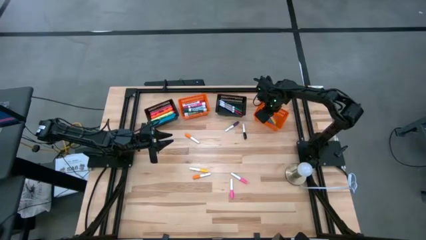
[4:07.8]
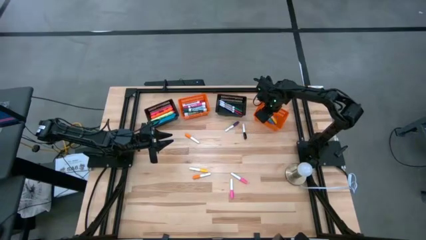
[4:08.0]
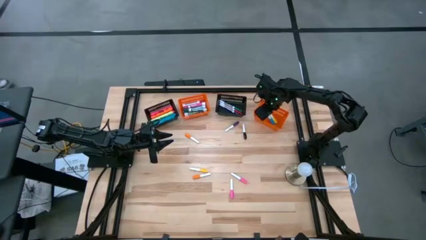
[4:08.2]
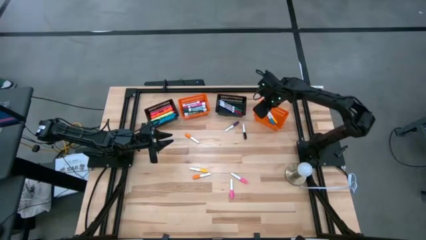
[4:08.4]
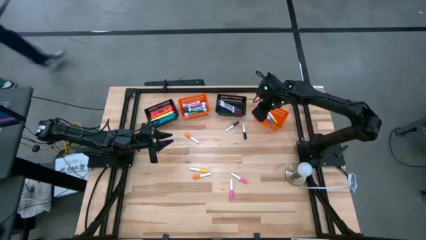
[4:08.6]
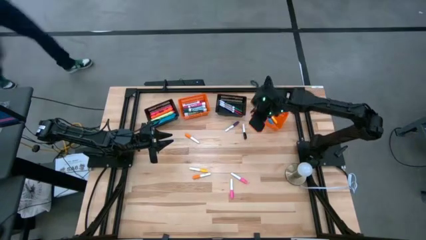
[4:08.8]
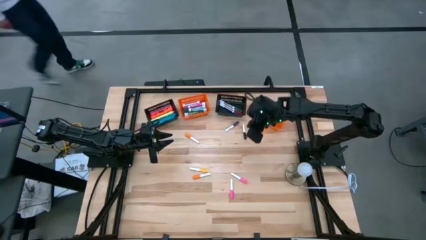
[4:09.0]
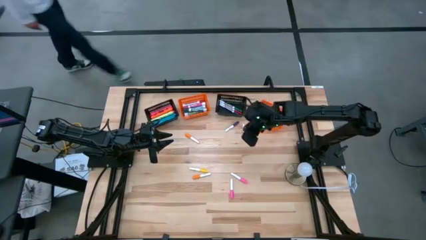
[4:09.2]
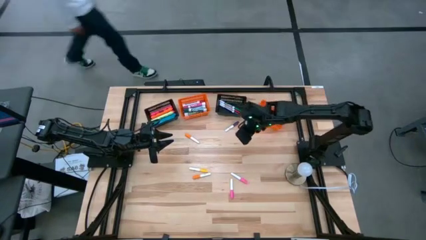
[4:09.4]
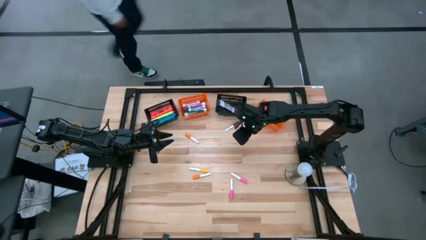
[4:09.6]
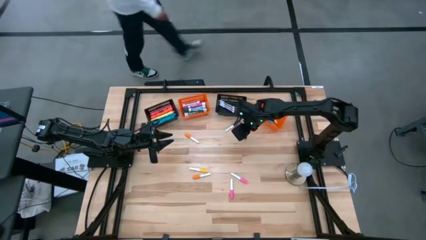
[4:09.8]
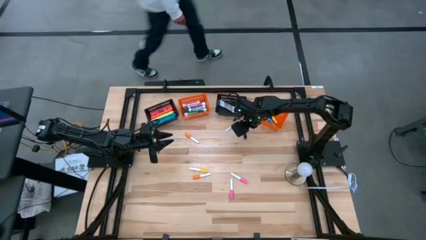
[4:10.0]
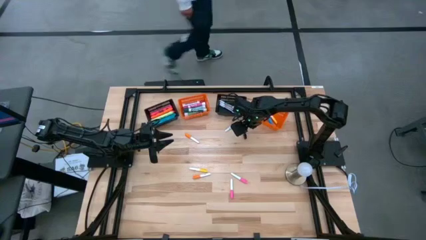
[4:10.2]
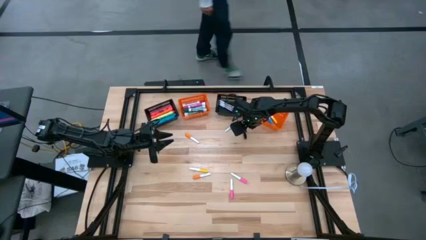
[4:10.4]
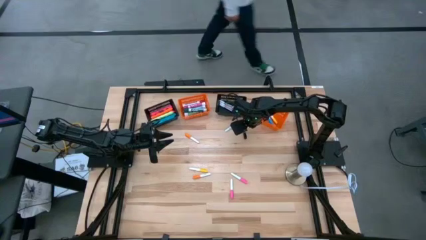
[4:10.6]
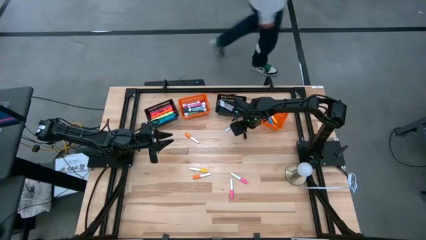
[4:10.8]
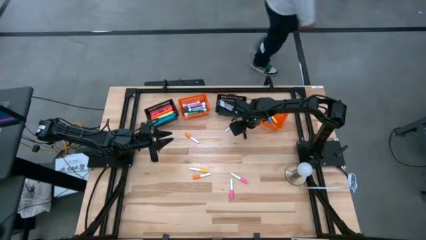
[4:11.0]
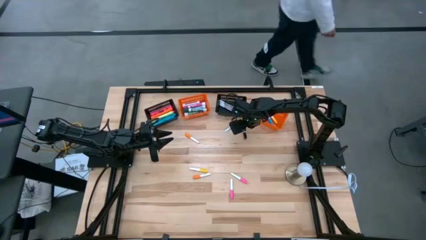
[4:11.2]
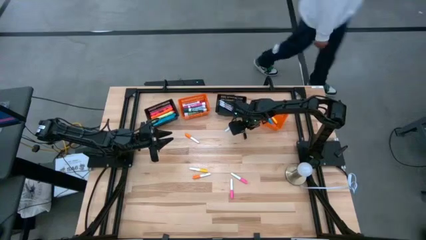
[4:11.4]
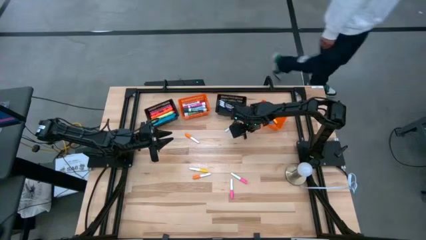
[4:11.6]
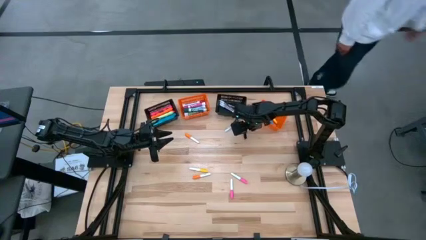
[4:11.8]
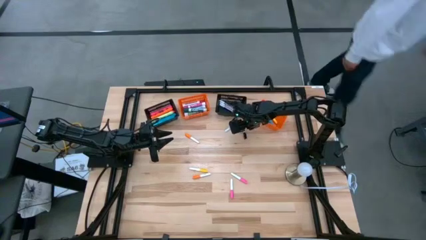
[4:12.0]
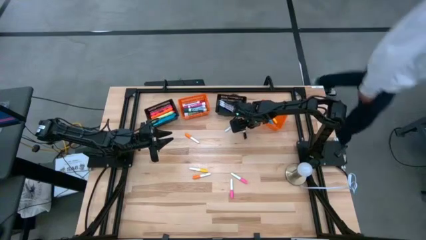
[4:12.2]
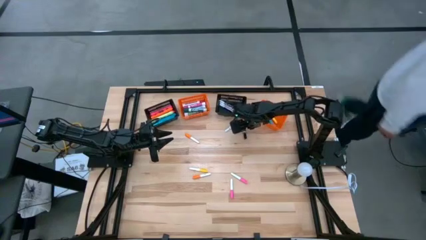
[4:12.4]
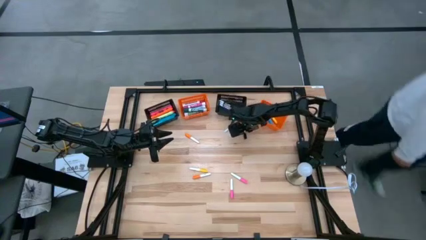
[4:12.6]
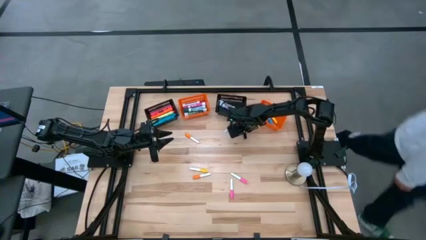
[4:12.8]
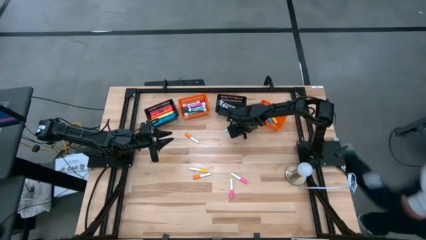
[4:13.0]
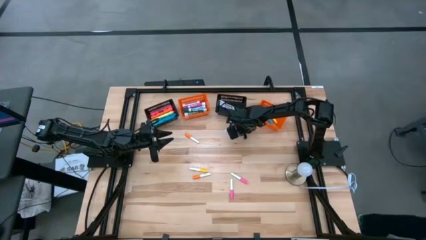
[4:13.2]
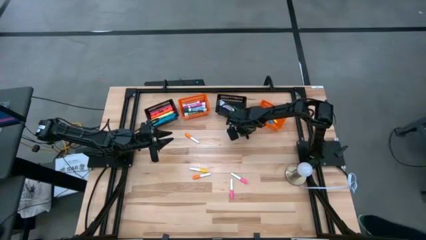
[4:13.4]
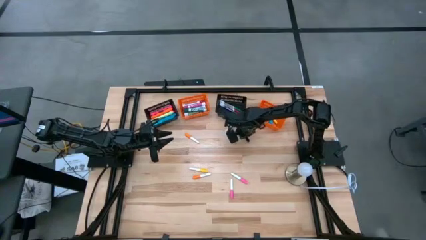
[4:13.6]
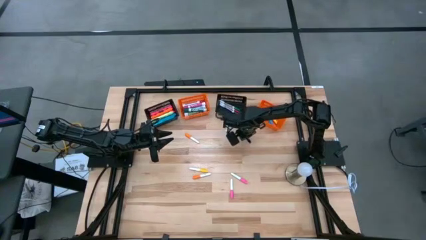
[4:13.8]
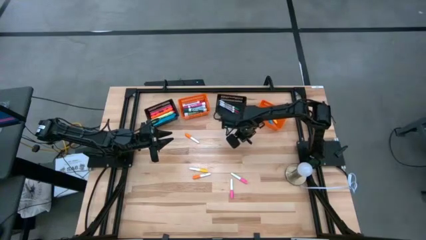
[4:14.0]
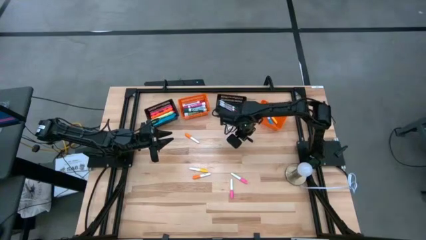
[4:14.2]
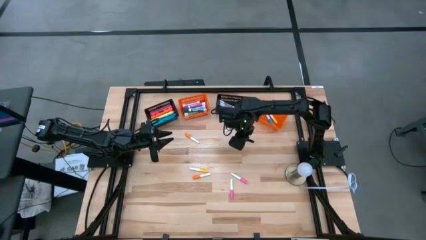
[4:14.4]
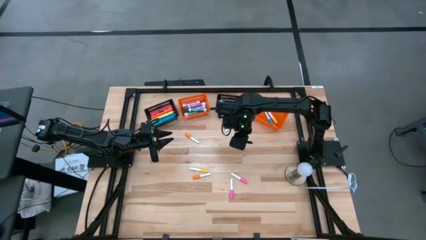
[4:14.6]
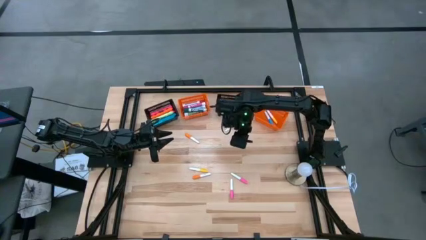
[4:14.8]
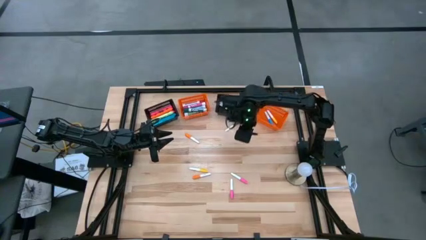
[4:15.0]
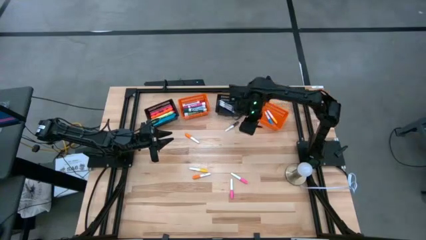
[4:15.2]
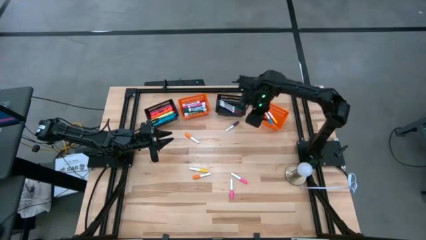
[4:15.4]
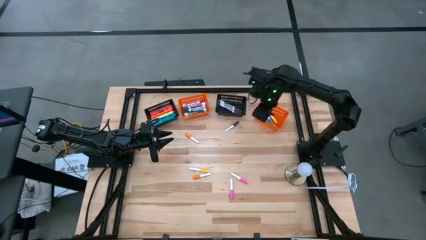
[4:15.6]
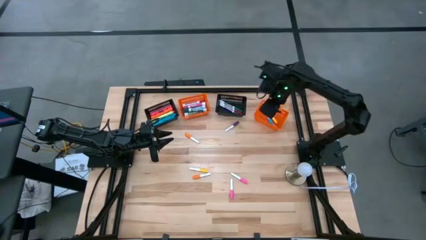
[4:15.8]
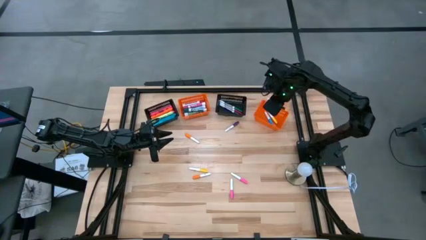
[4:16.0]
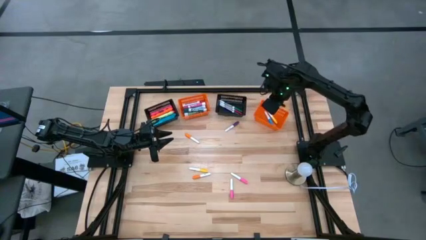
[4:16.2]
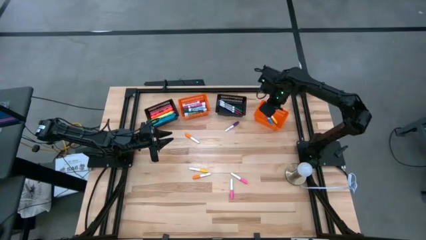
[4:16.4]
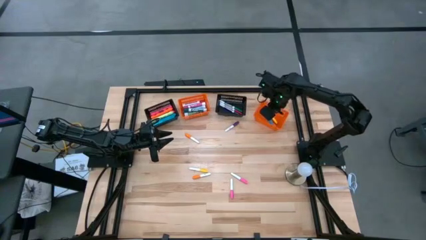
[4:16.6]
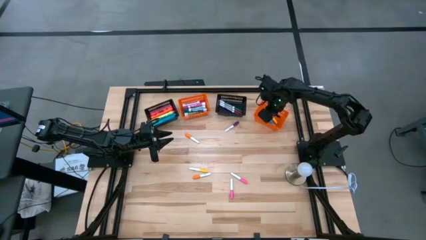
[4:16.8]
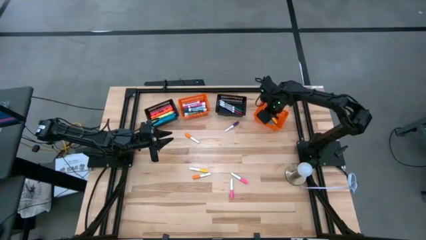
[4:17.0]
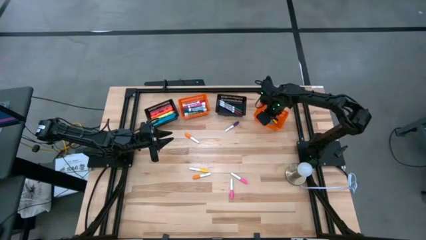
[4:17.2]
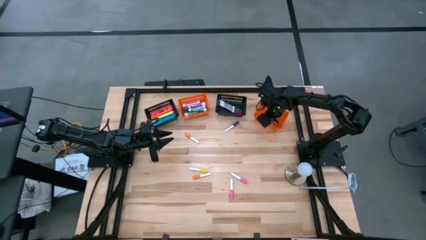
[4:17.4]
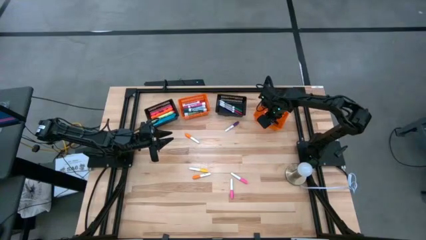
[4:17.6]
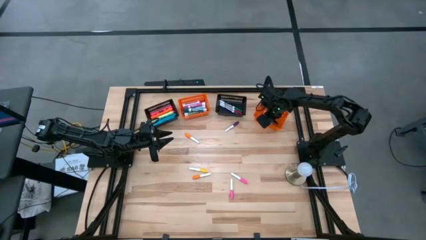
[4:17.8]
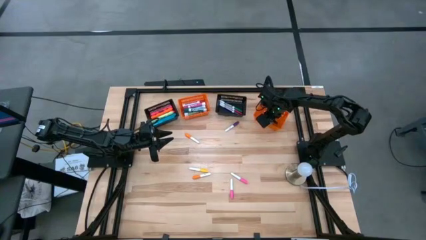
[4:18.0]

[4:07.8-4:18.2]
Task: Pick & Place Markers
Put the black small highlighter pen into the left orange bin

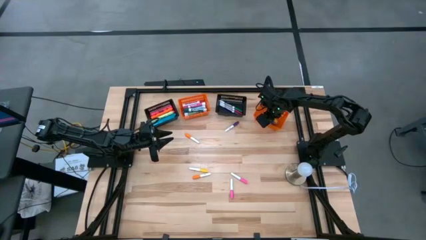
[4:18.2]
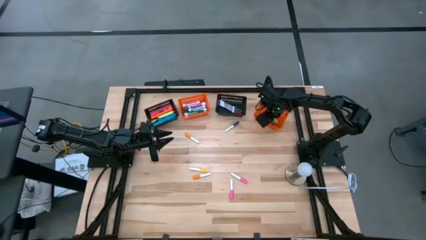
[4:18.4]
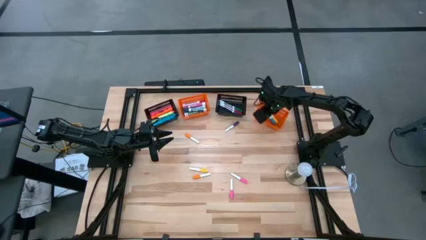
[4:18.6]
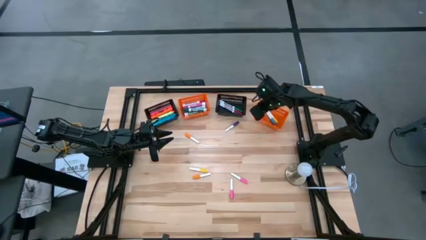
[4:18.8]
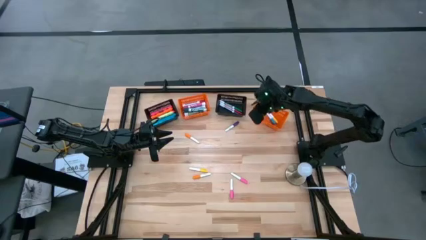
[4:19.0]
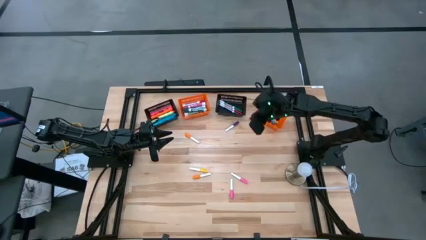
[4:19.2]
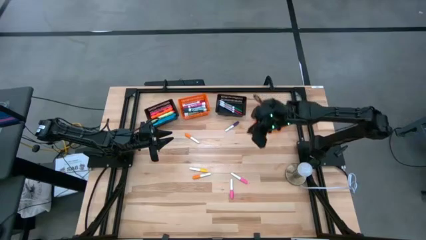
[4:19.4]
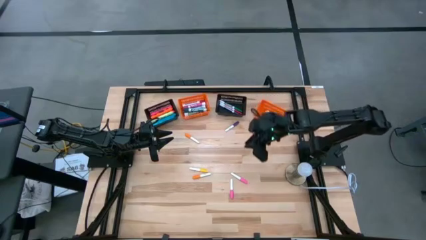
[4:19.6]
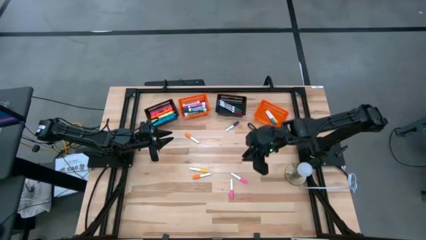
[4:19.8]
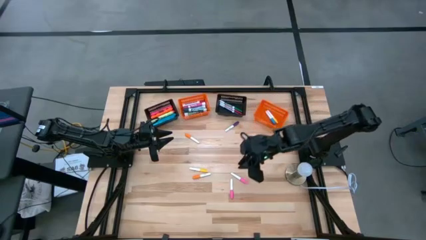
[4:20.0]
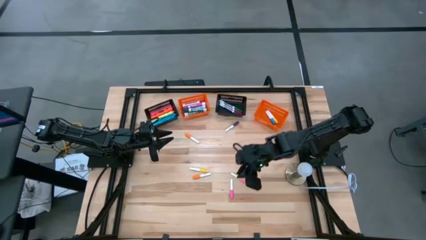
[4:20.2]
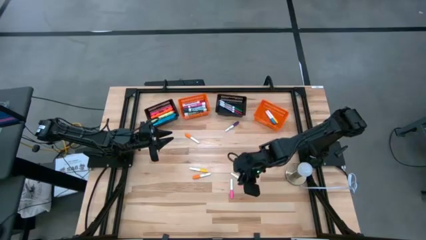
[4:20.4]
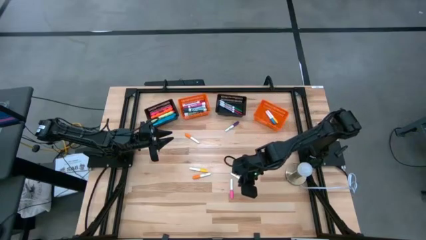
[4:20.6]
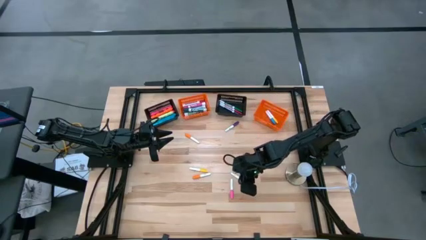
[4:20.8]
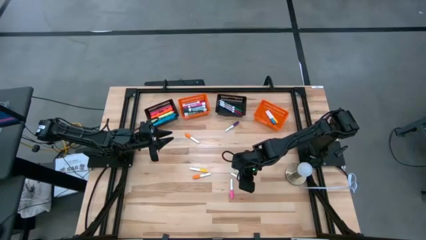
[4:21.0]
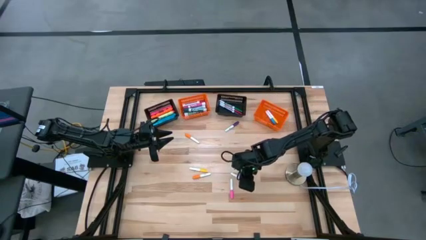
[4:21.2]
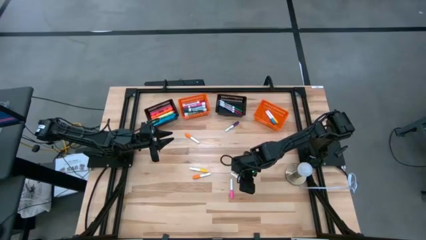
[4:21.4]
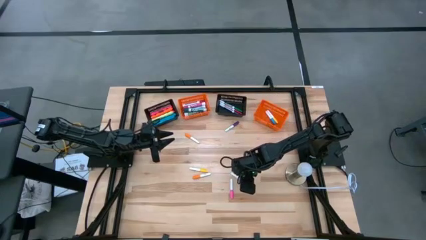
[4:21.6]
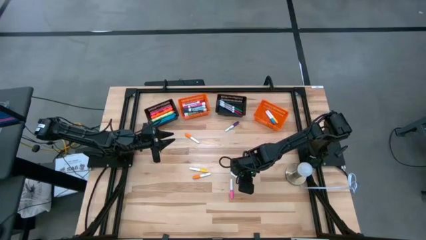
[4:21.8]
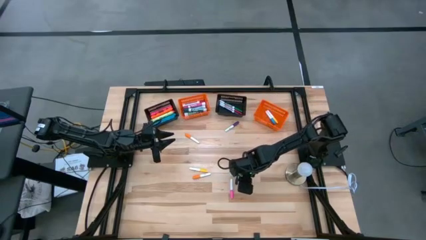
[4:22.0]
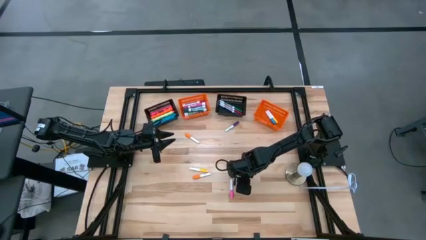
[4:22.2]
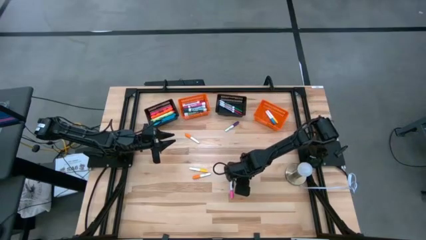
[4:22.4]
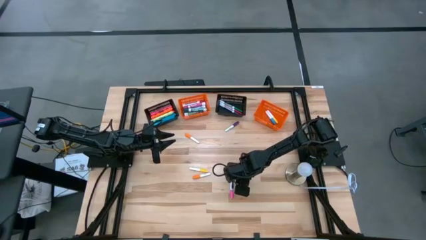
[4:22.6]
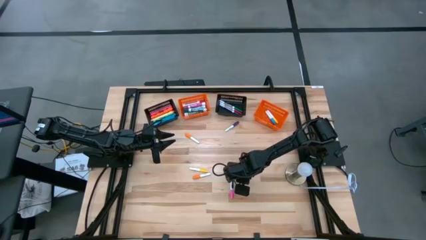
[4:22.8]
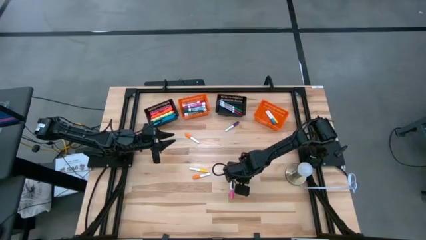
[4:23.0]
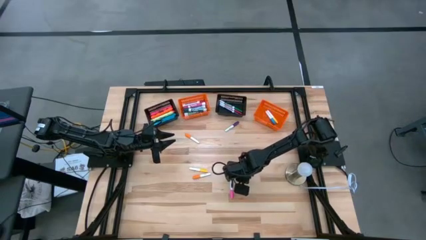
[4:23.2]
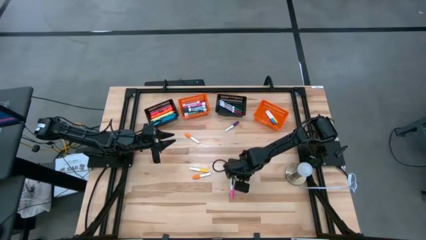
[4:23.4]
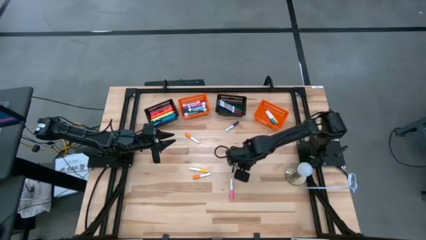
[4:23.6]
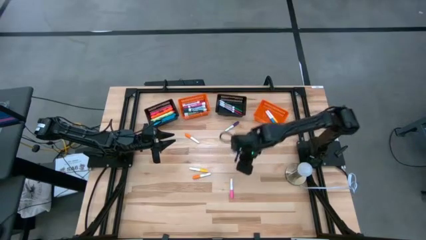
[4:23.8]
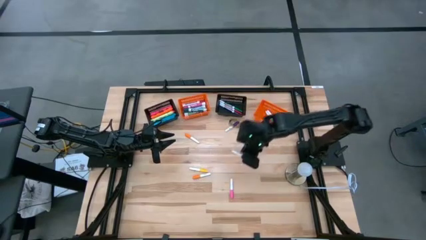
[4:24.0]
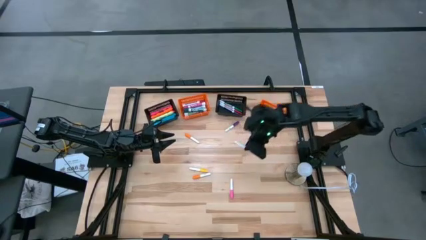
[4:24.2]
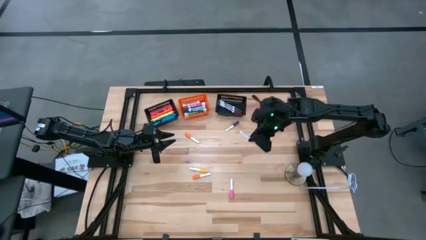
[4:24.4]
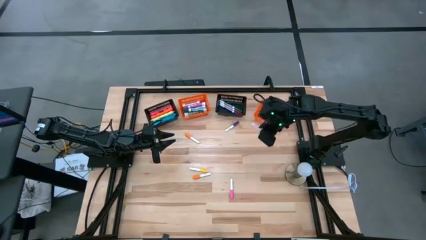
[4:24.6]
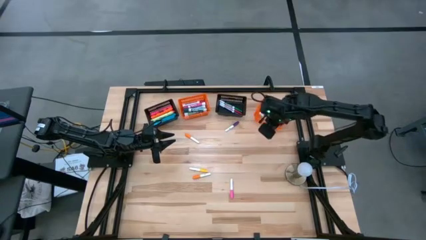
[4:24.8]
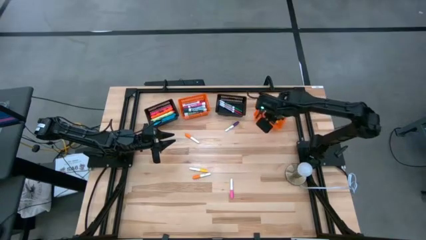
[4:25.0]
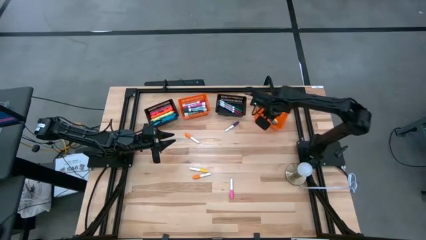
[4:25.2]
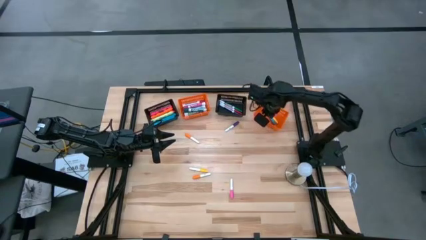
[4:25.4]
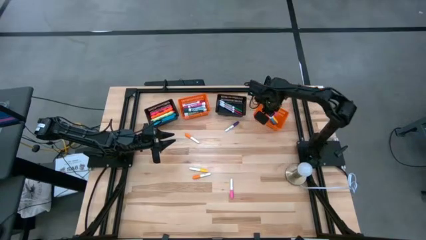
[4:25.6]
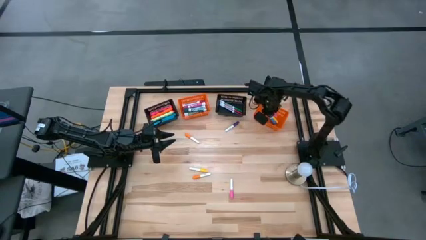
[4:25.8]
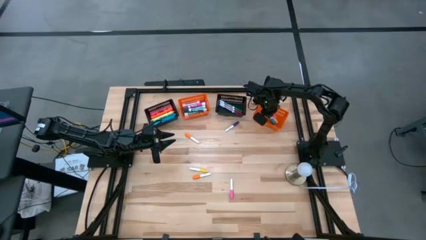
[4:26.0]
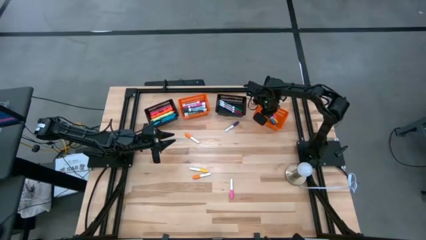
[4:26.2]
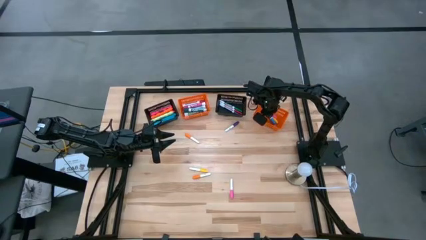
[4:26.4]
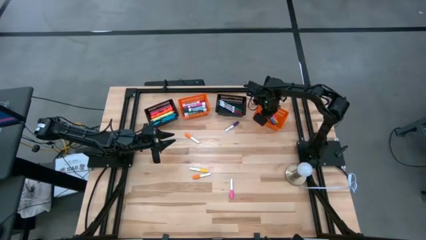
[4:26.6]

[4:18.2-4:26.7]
Put the pink small highlighter pen into the left orange bin
